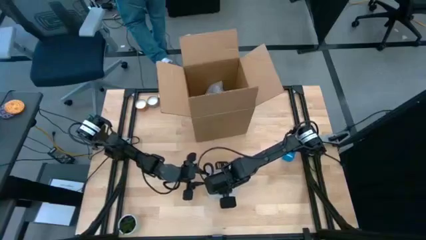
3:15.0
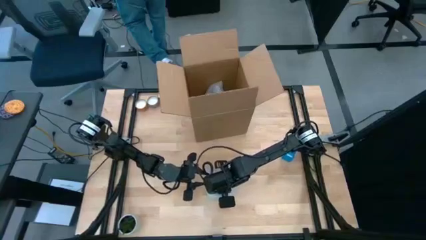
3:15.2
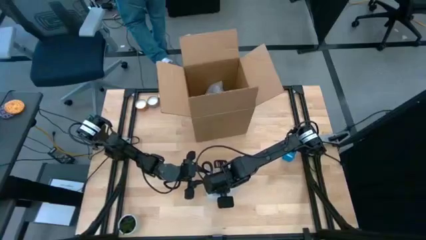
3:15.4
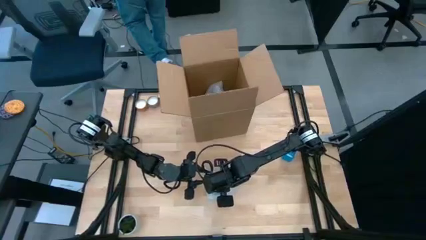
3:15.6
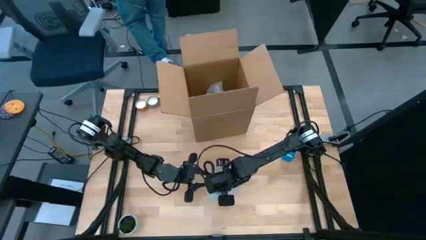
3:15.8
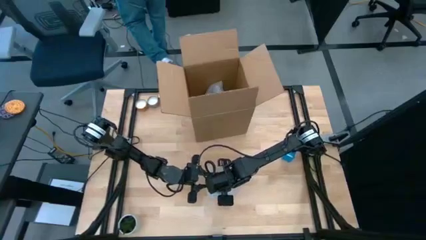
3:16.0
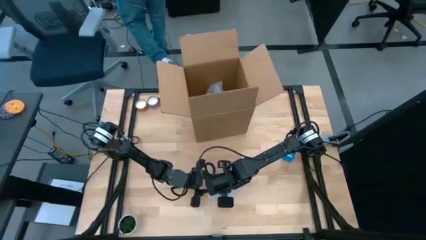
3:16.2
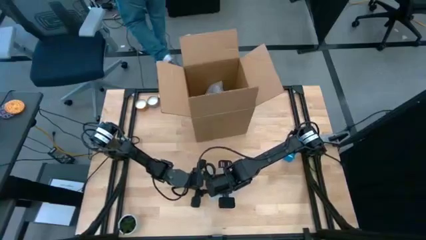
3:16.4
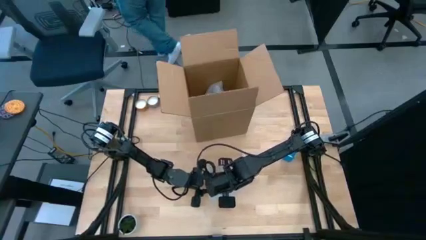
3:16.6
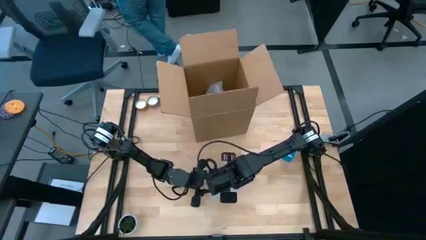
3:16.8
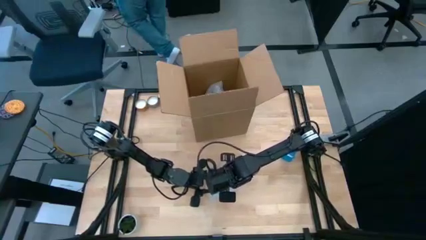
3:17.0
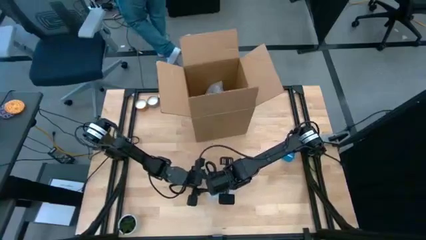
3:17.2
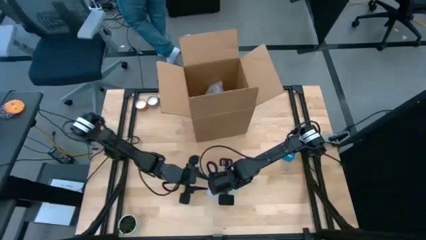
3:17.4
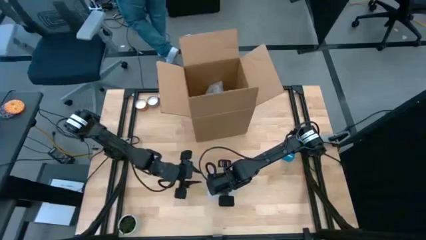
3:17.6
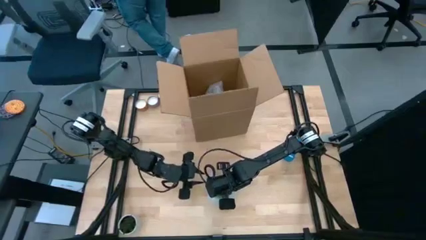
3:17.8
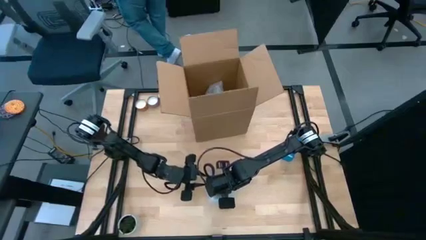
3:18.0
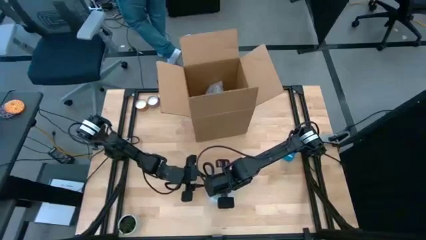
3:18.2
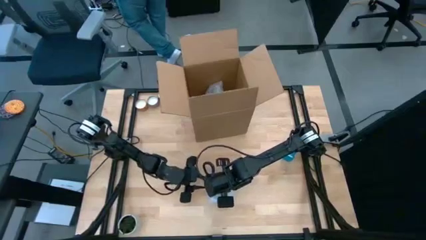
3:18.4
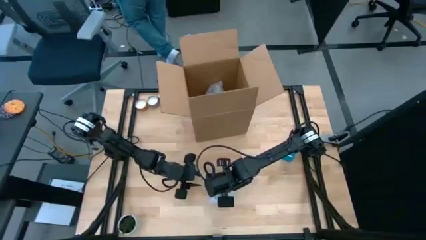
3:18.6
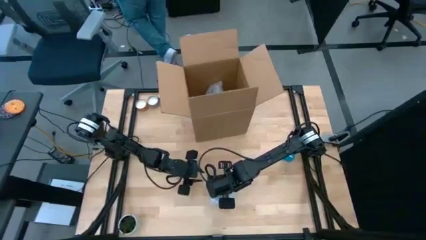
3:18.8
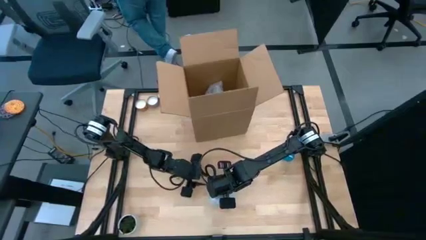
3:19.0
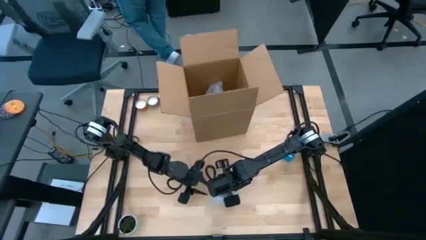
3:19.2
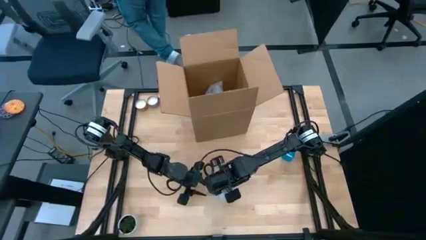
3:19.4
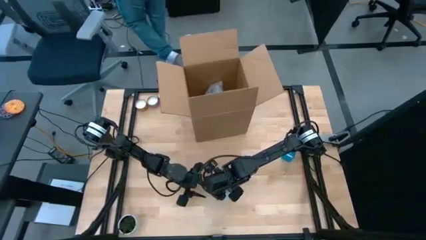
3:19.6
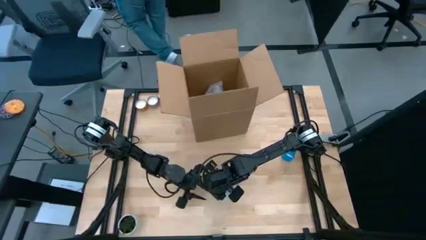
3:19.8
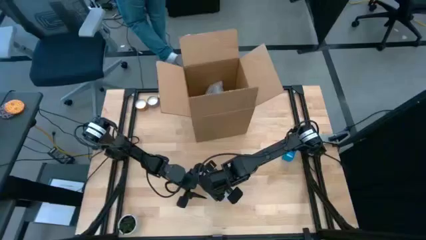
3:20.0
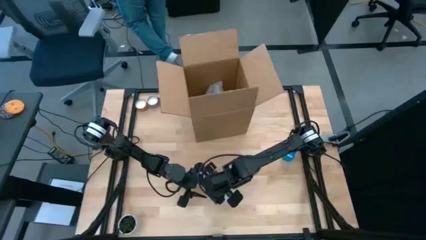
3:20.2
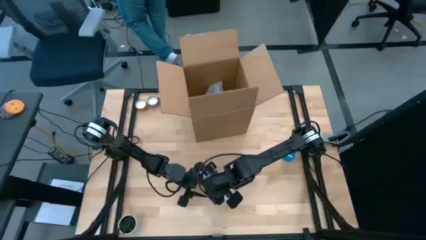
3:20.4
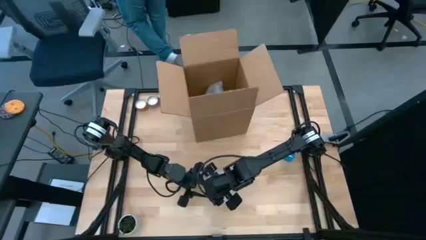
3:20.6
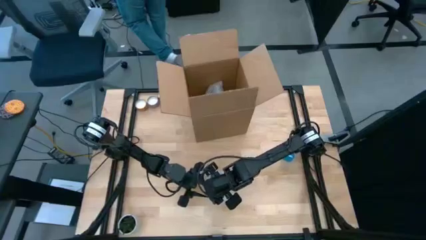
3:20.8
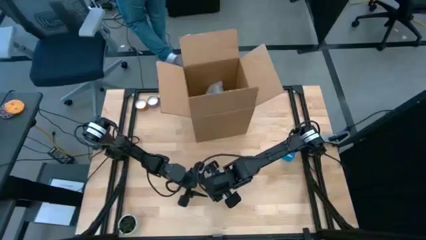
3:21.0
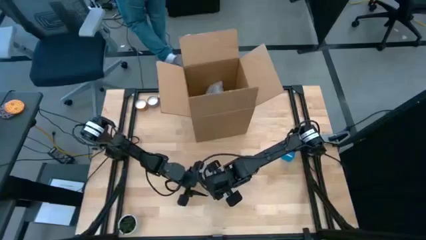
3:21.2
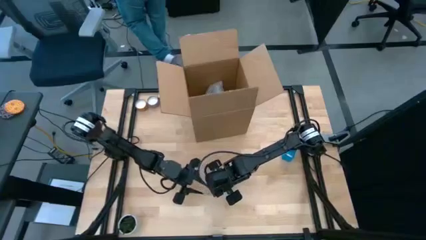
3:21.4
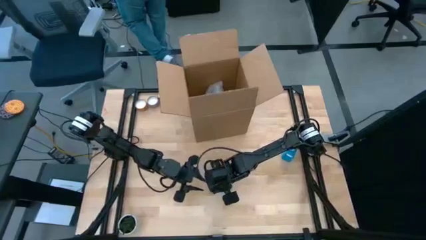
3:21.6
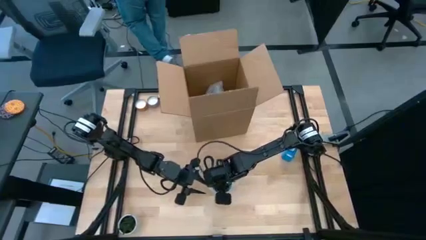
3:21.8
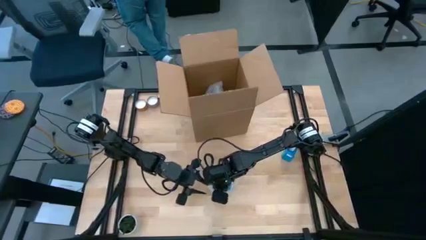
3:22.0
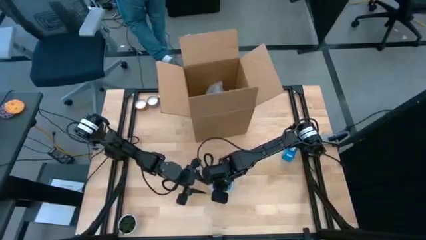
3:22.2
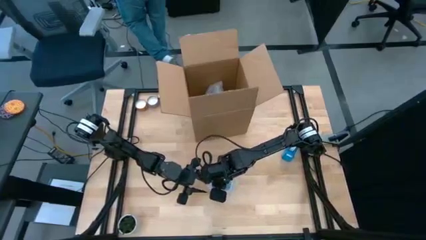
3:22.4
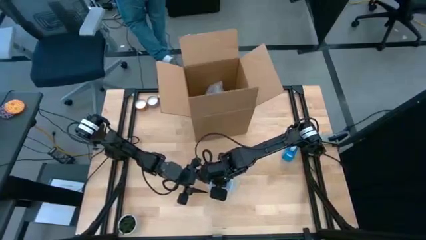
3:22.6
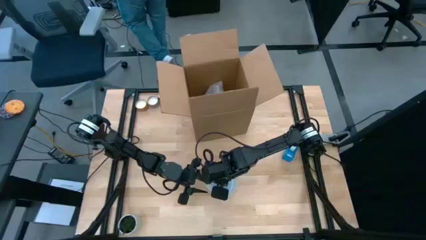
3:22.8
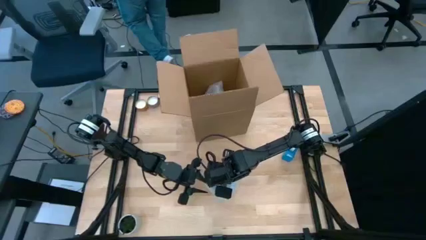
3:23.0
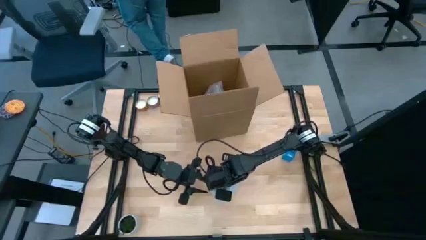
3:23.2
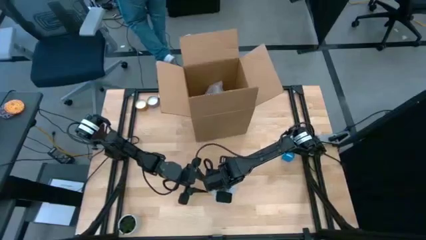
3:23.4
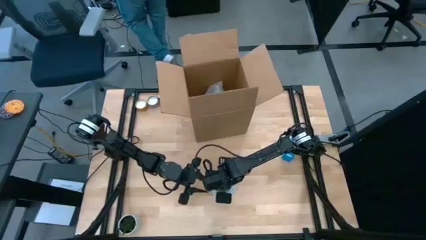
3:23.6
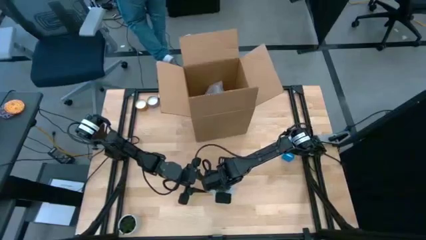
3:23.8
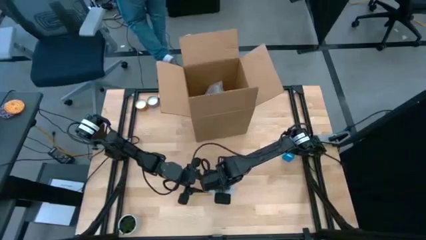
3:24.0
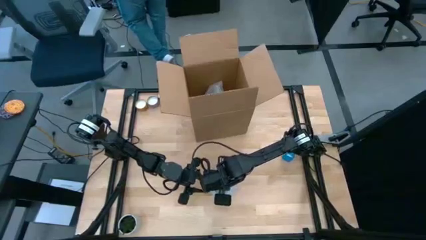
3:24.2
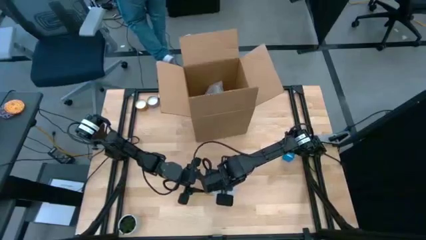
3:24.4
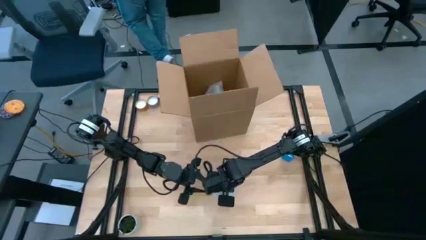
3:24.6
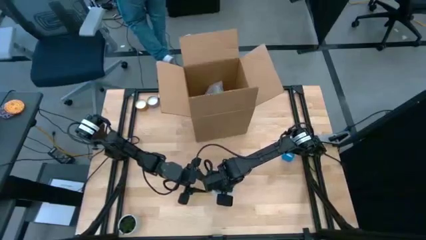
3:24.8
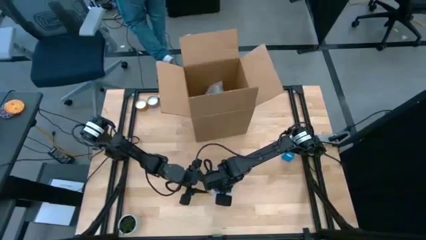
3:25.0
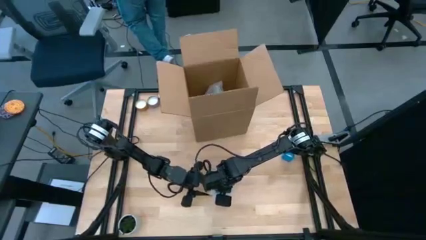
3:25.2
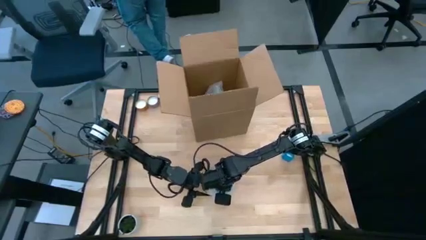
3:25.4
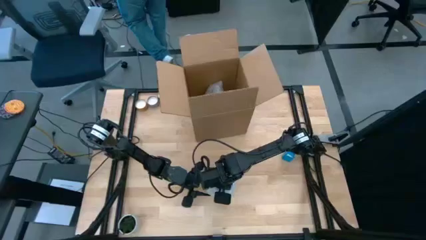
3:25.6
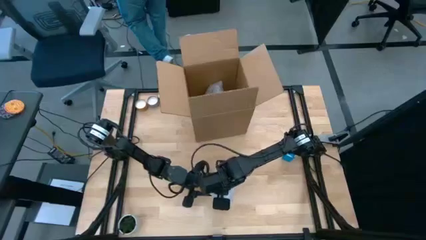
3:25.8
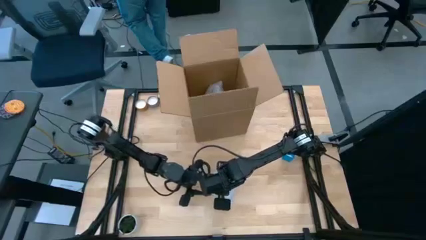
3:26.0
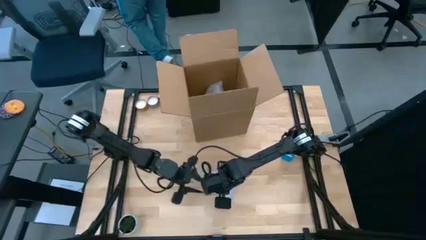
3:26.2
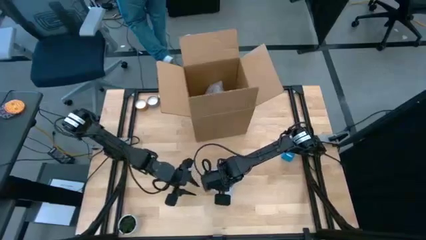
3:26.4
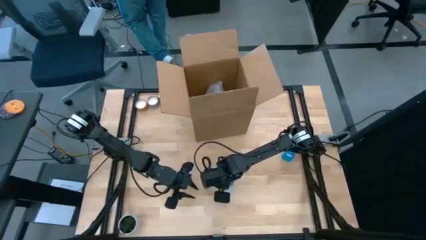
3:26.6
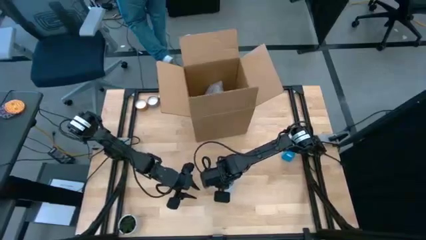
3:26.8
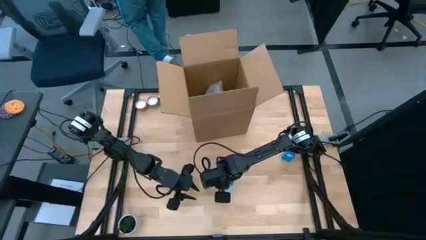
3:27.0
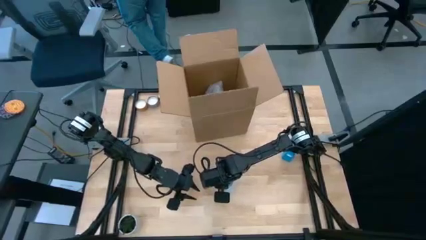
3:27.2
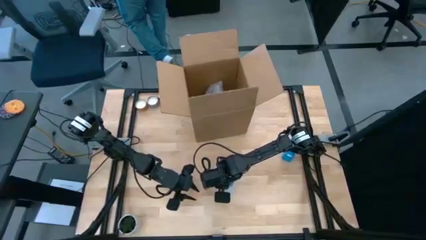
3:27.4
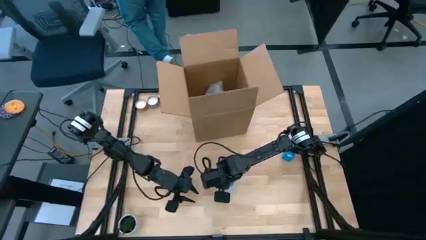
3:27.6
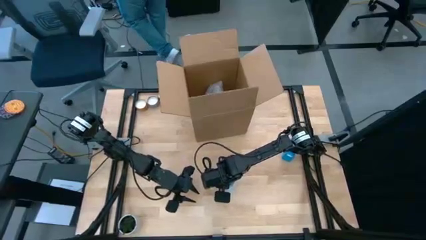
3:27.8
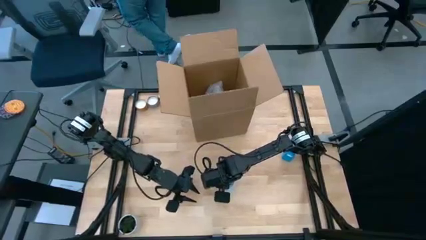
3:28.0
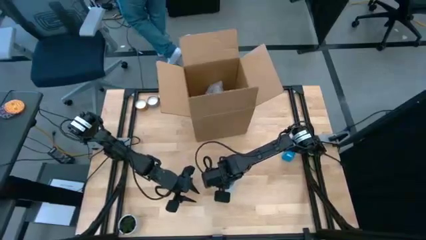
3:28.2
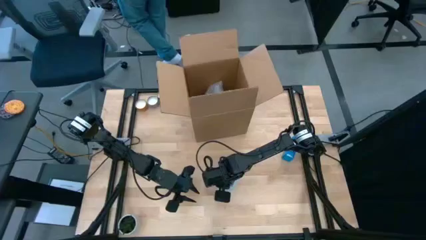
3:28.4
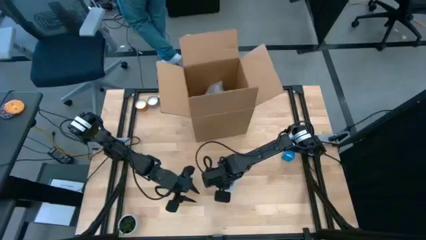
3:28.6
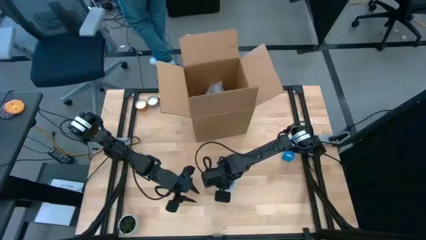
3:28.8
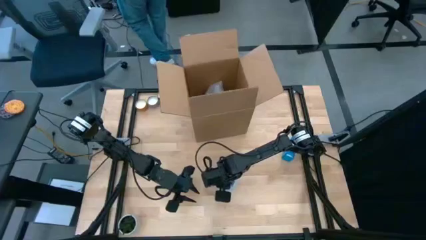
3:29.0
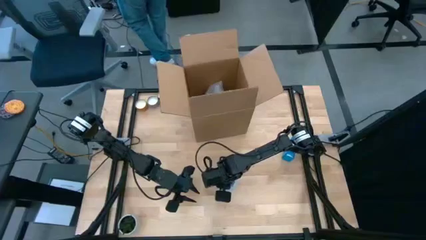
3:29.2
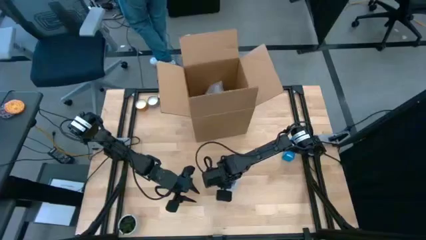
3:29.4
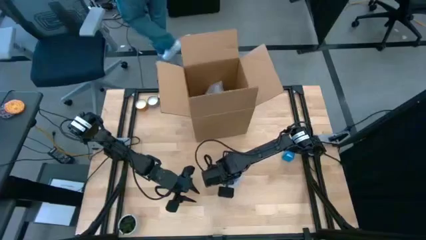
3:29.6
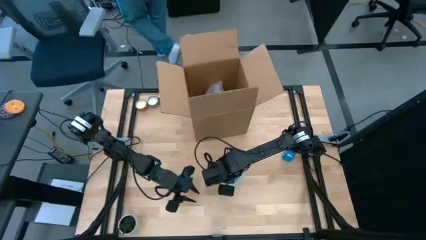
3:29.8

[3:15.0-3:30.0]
Task: wrap mug
Wrap the blue cup with bubble wrap
